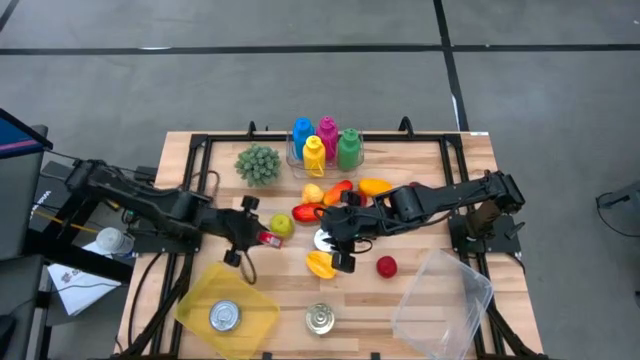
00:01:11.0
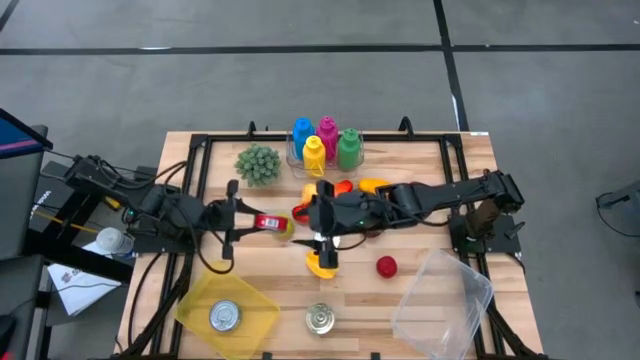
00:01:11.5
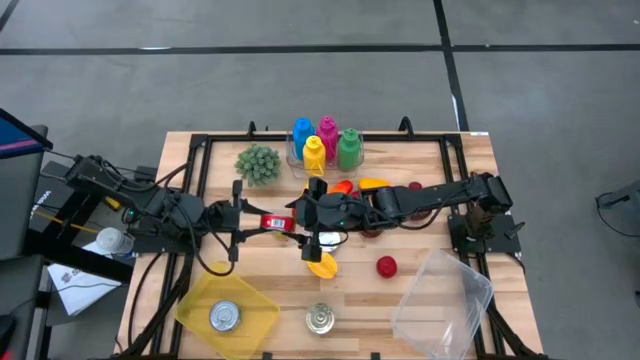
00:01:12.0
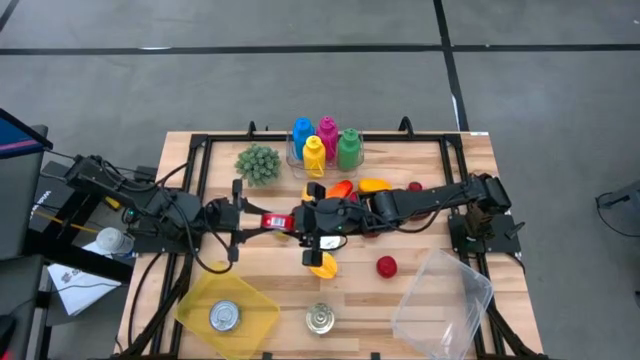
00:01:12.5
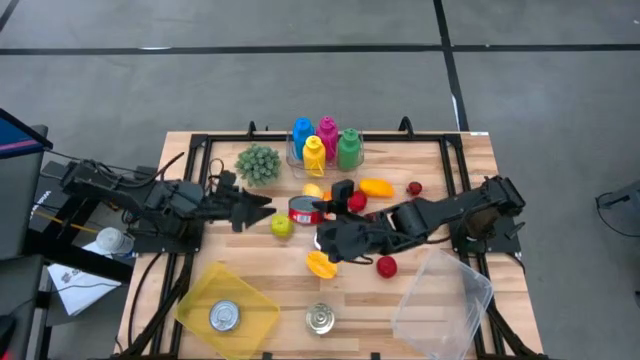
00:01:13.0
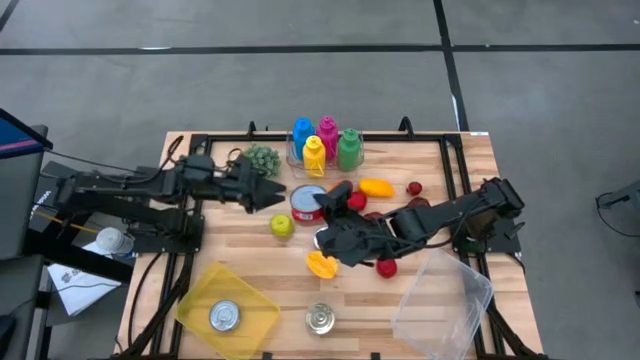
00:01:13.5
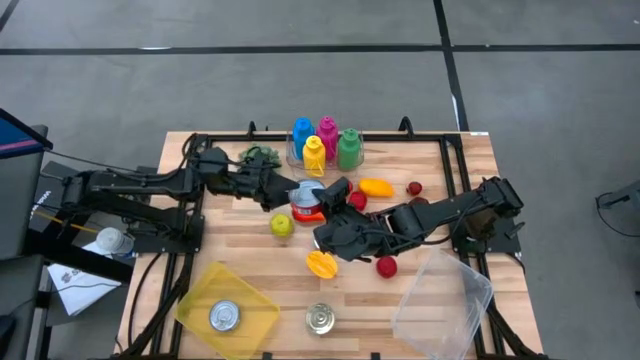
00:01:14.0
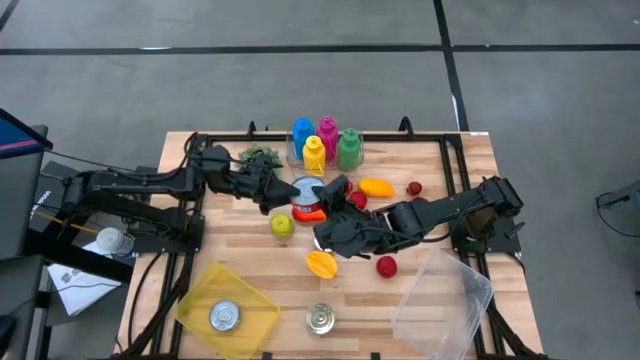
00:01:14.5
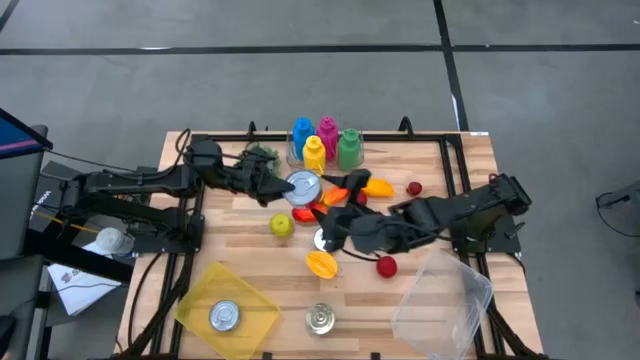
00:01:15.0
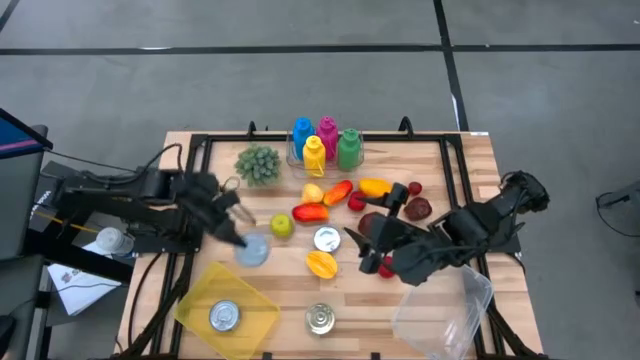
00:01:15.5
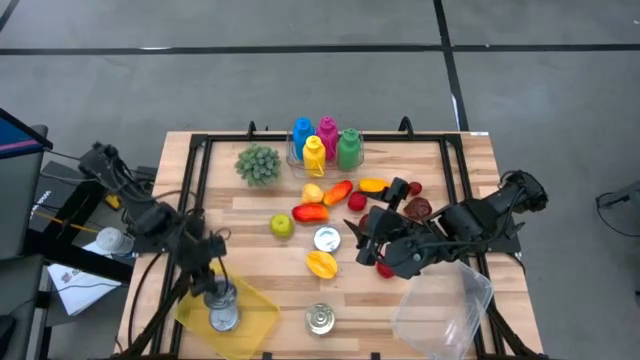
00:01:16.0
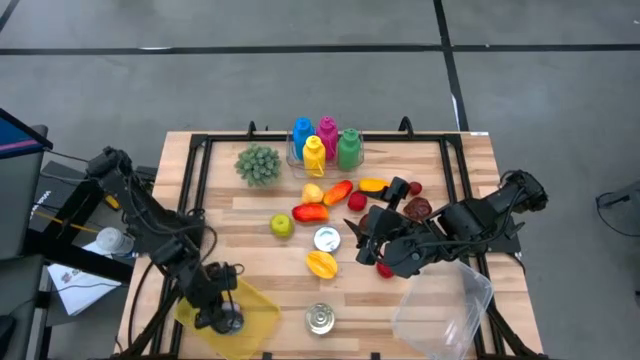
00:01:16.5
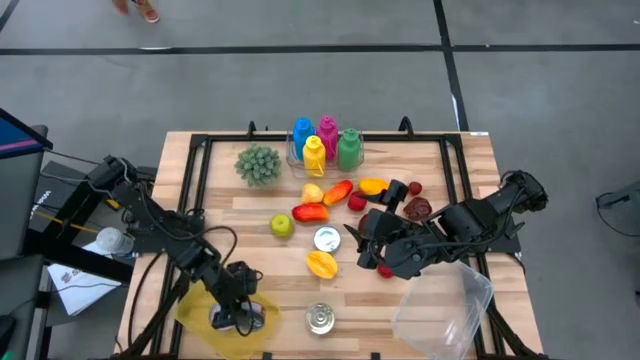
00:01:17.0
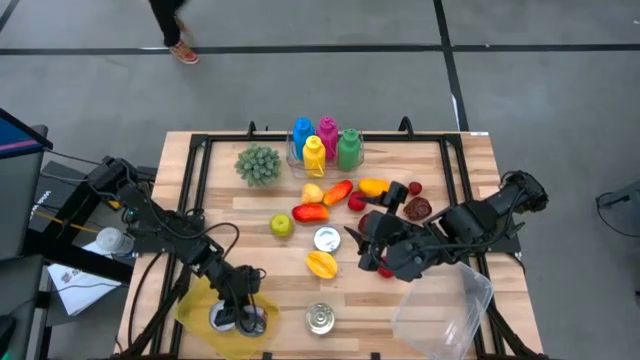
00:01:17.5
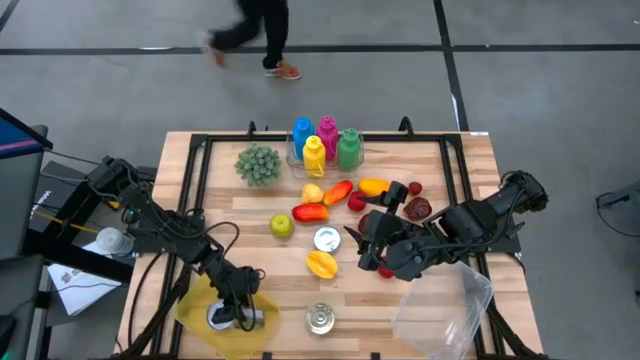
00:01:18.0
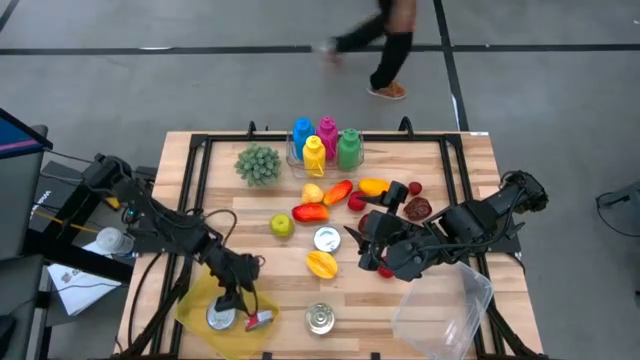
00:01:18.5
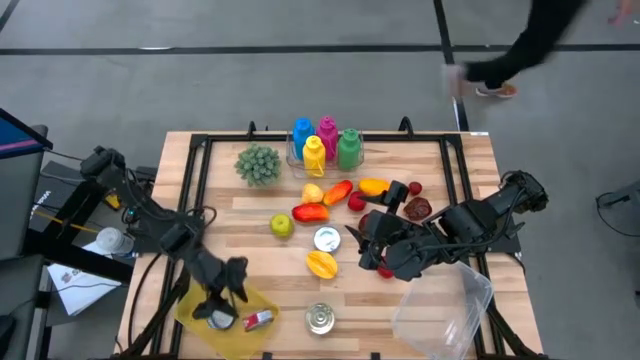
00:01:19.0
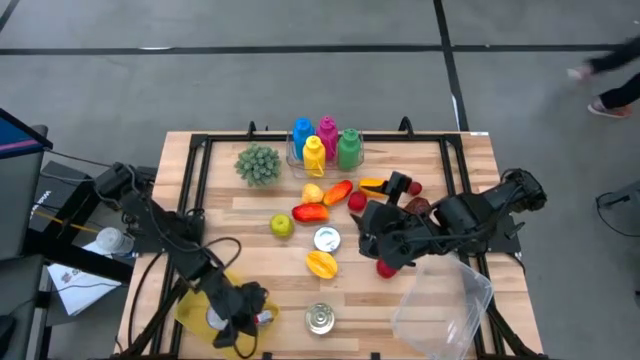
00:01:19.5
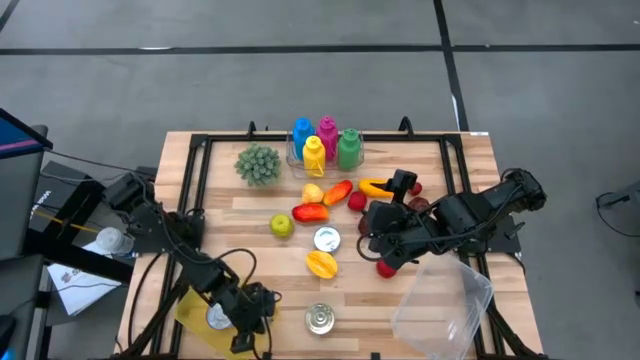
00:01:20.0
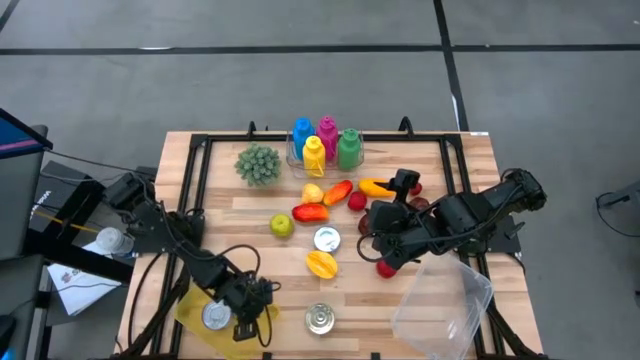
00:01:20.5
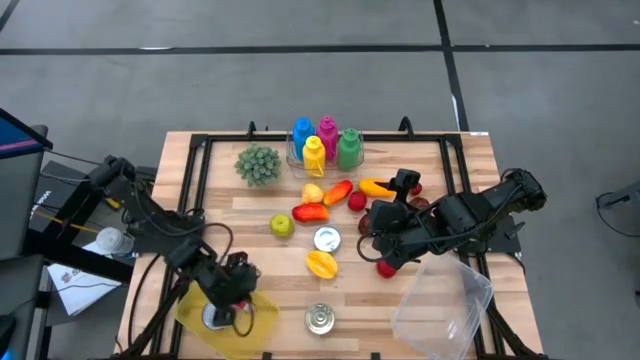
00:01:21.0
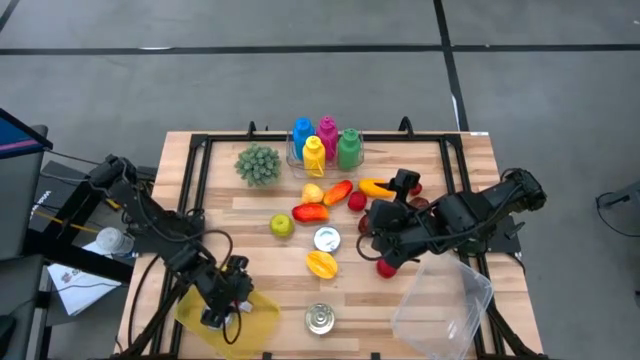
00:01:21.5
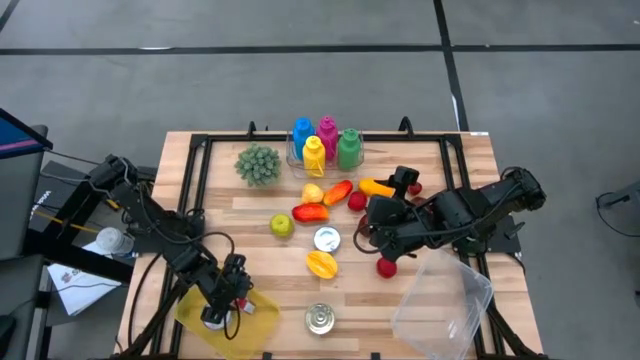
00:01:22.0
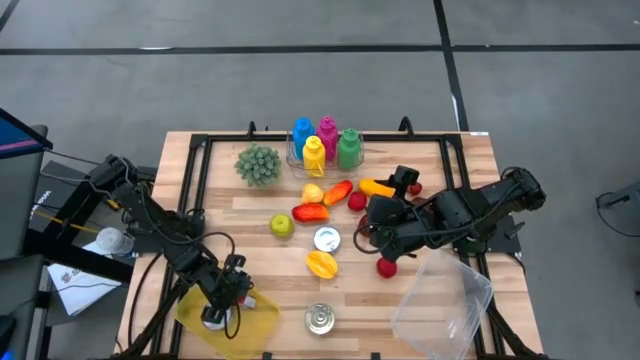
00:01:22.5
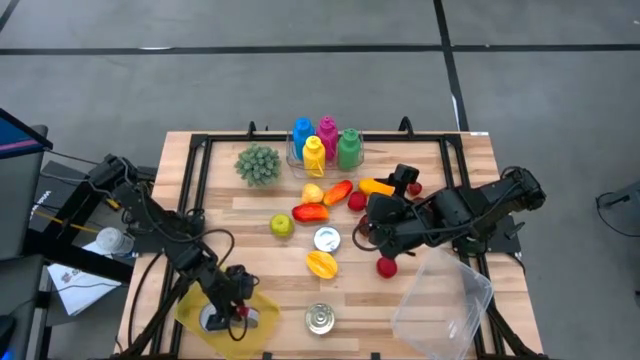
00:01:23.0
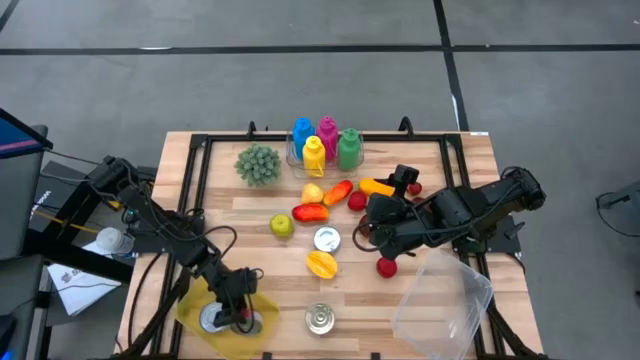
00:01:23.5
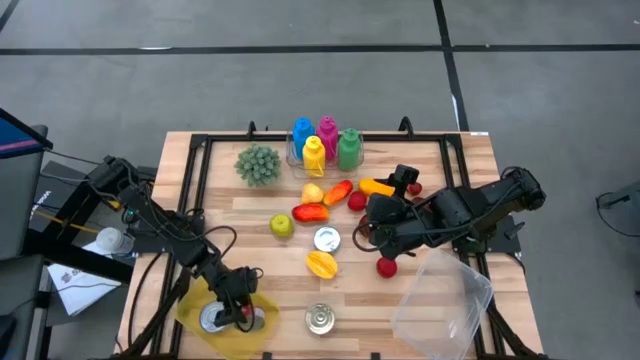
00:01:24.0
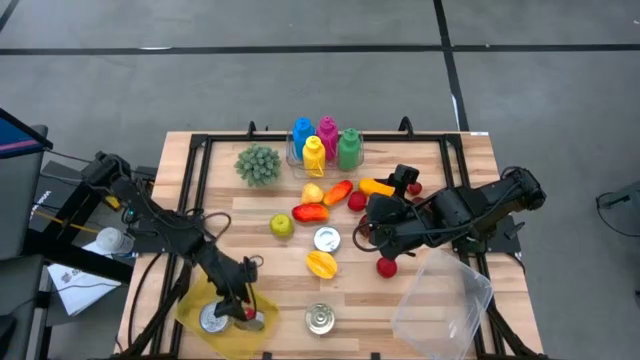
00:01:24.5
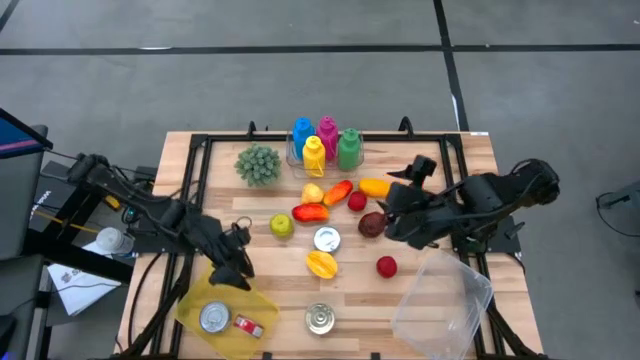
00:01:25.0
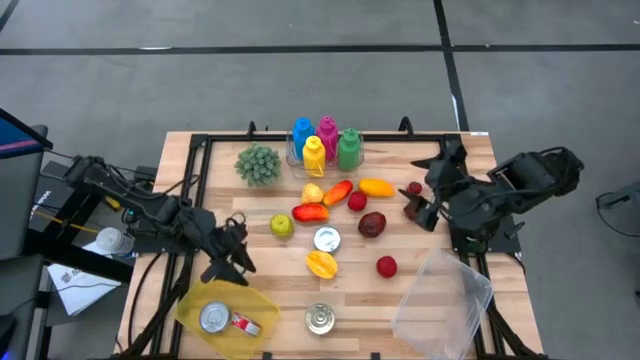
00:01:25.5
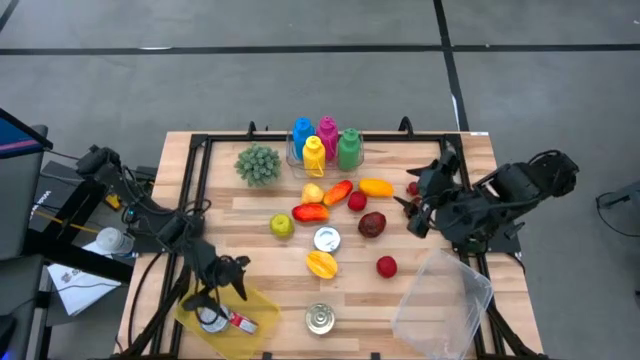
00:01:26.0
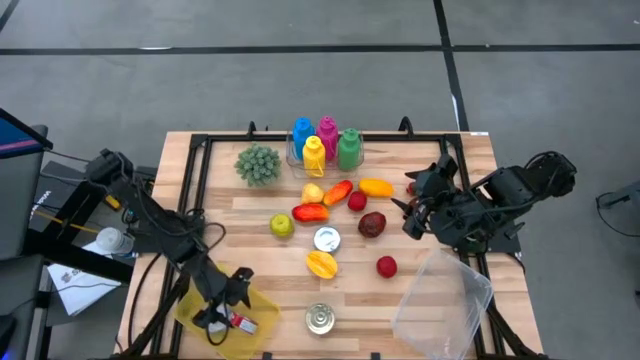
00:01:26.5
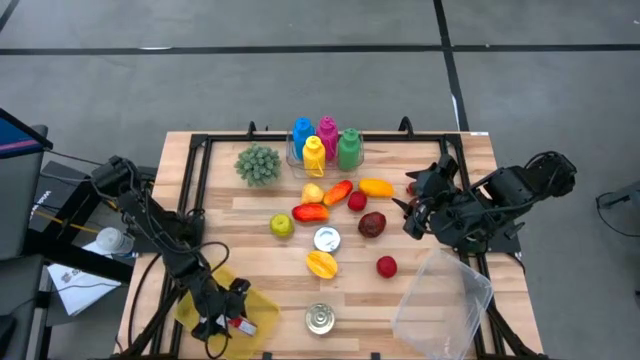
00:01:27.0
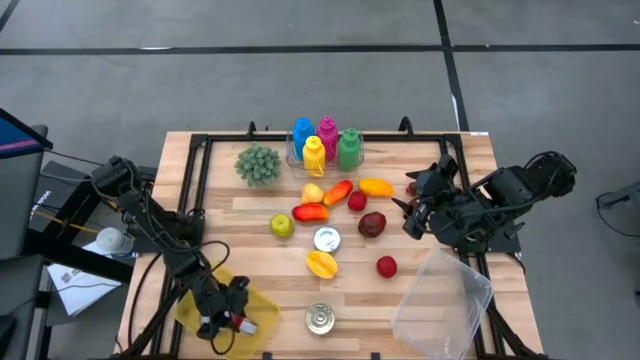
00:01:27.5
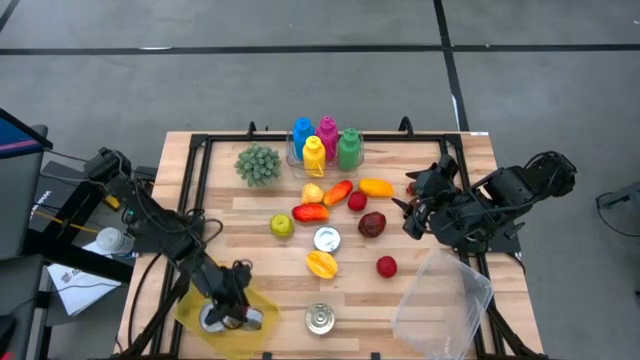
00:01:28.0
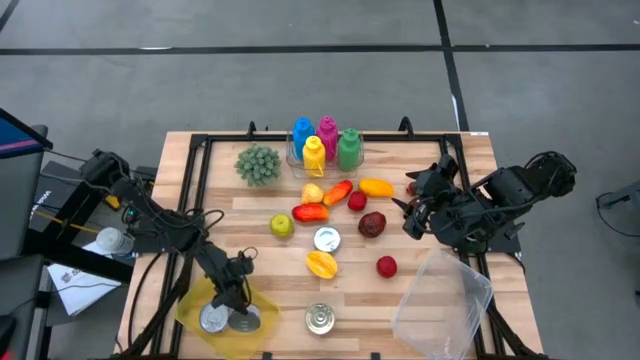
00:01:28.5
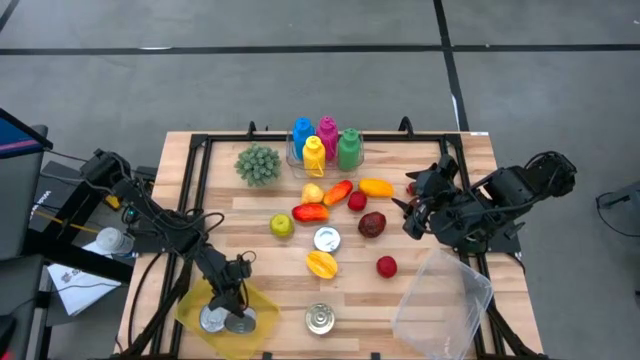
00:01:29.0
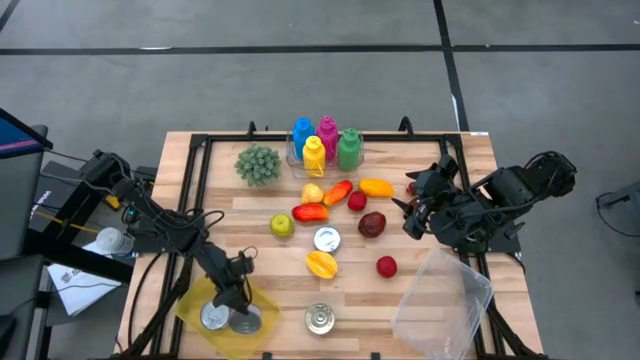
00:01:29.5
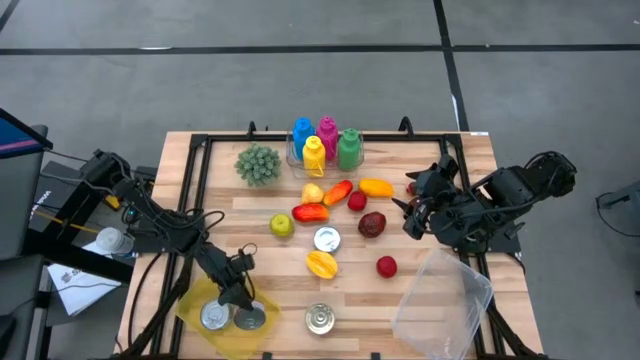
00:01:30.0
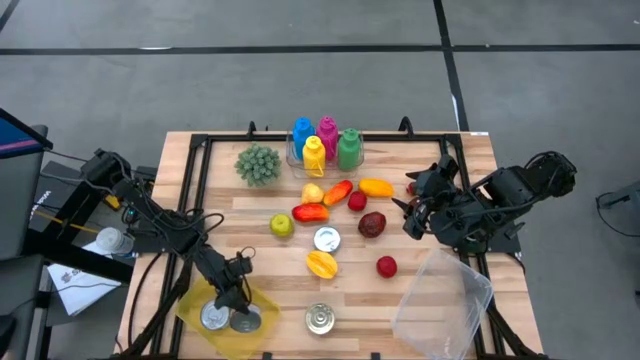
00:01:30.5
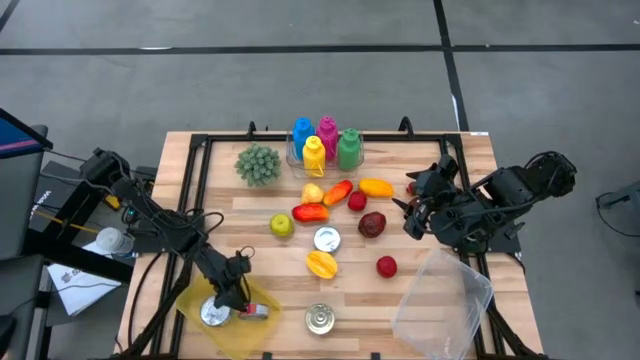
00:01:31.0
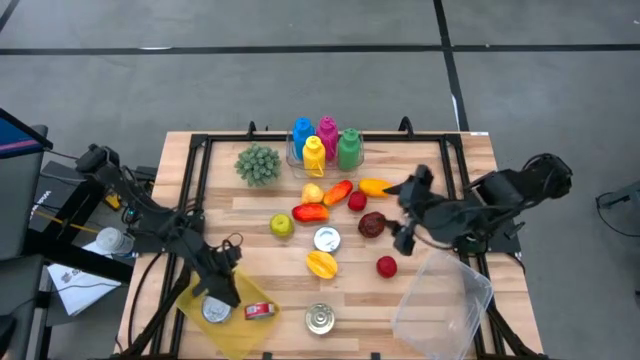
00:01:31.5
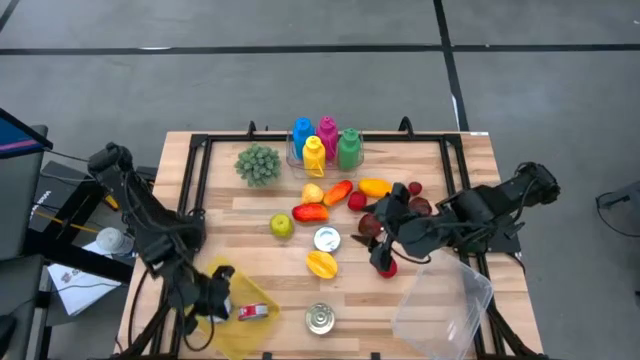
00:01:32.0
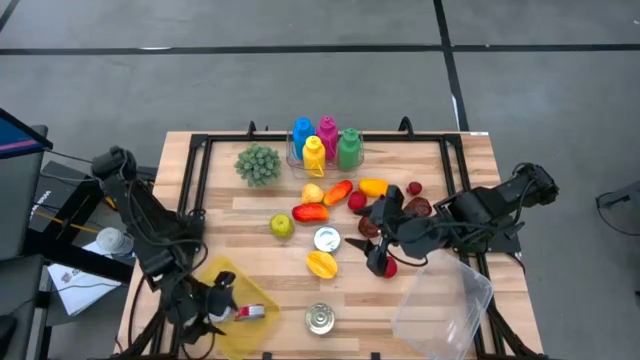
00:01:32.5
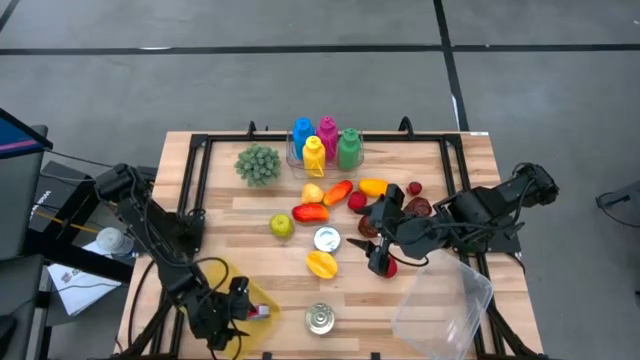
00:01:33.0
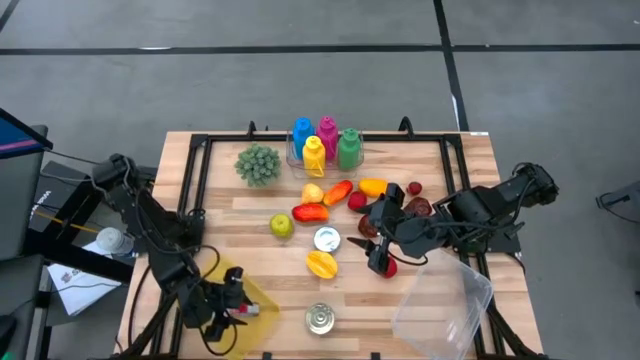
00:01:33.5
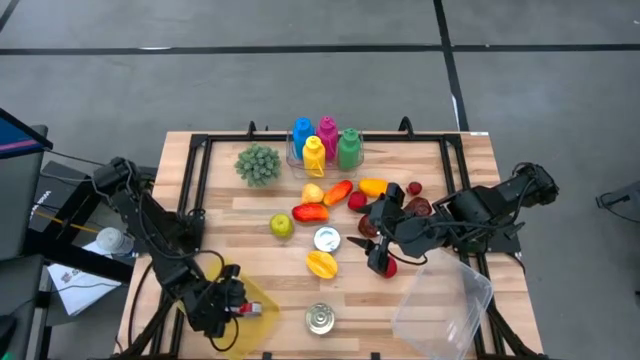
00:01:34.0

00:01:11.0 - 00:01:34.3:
Task: Pick & Place Food Item
Put the red tuna can into the yellow bin
